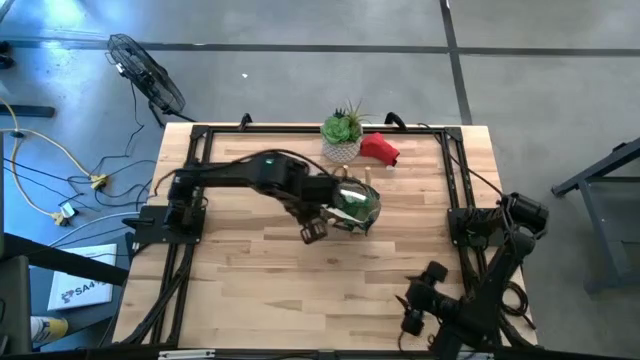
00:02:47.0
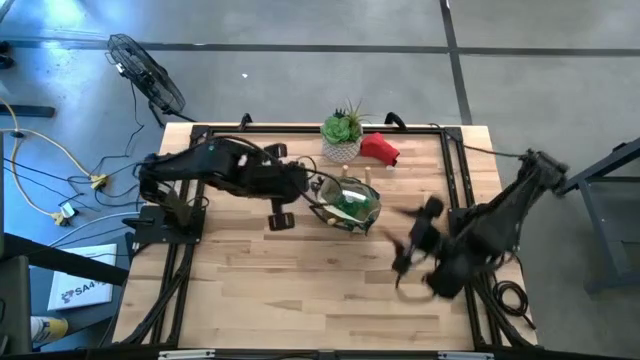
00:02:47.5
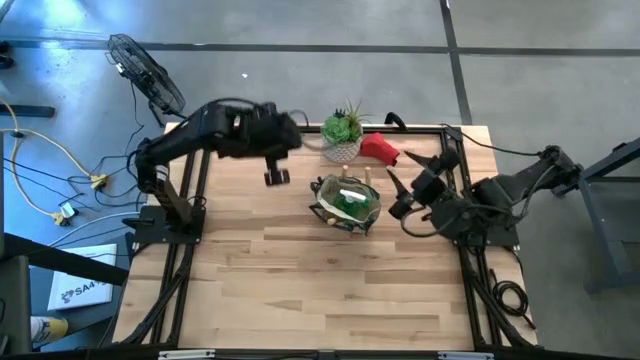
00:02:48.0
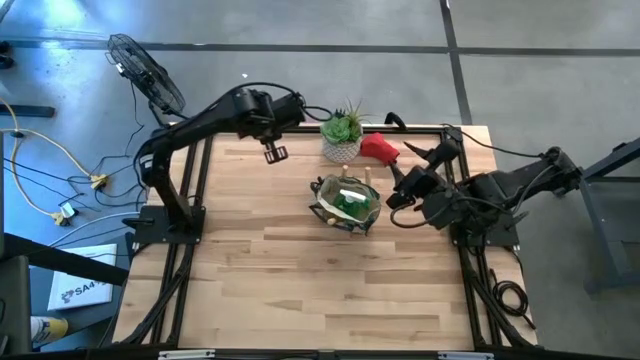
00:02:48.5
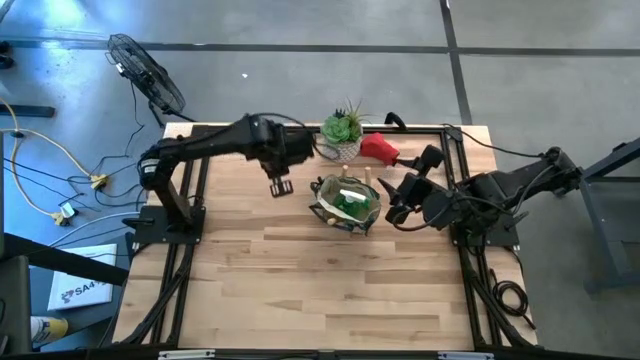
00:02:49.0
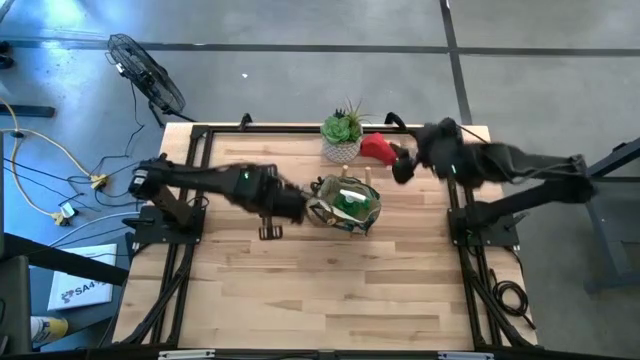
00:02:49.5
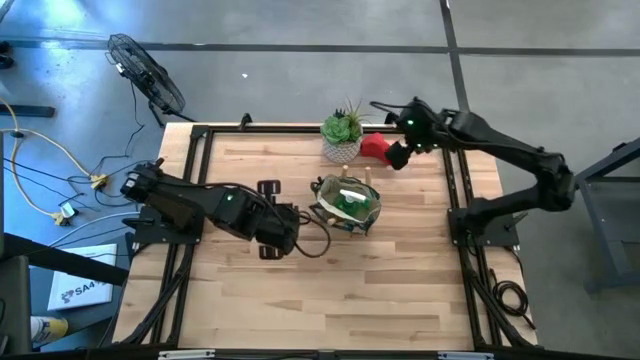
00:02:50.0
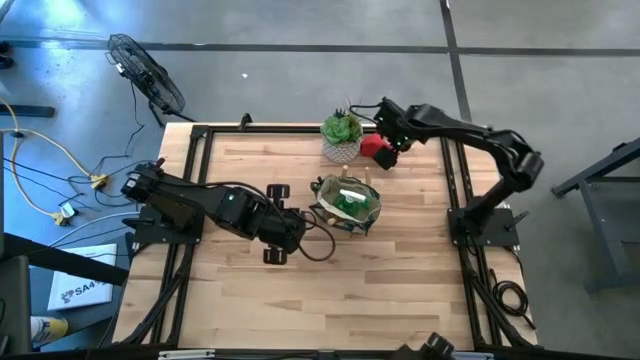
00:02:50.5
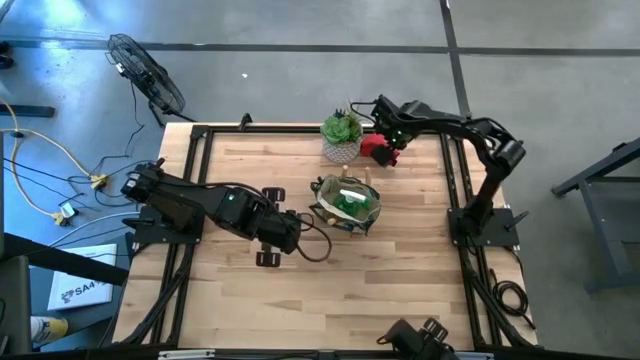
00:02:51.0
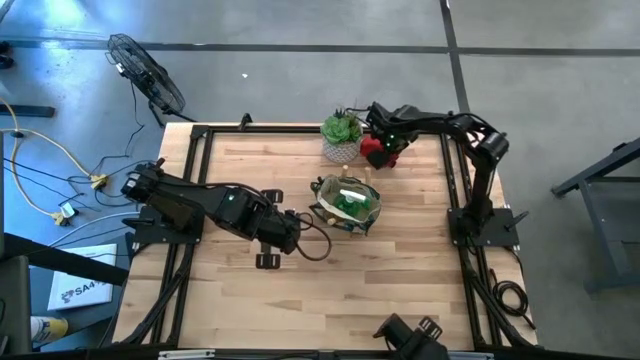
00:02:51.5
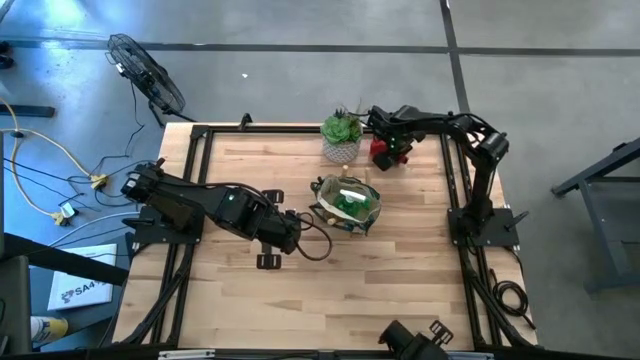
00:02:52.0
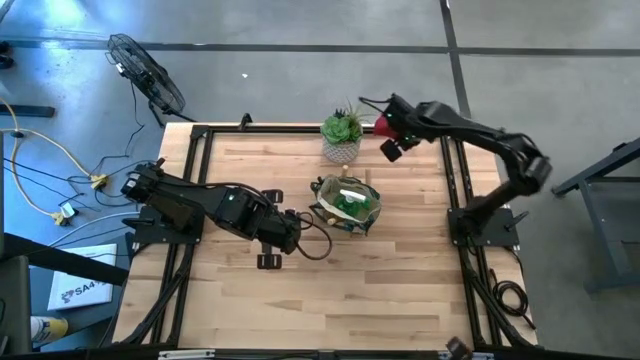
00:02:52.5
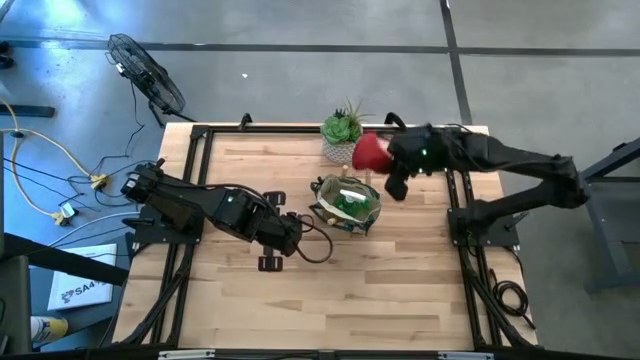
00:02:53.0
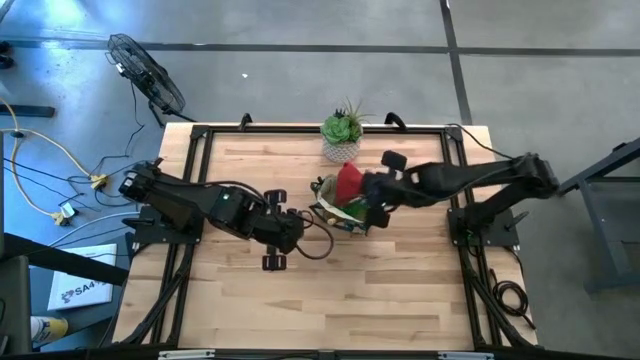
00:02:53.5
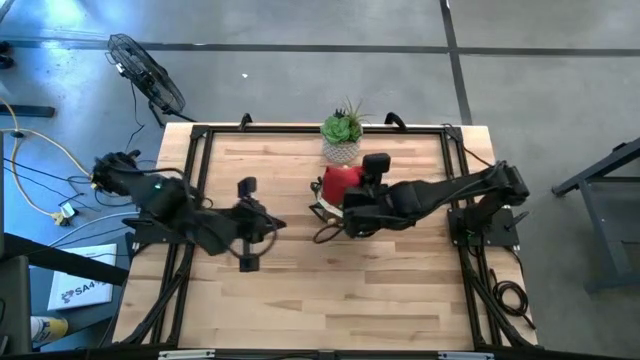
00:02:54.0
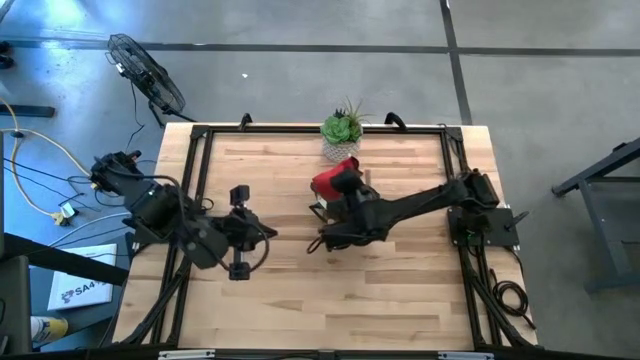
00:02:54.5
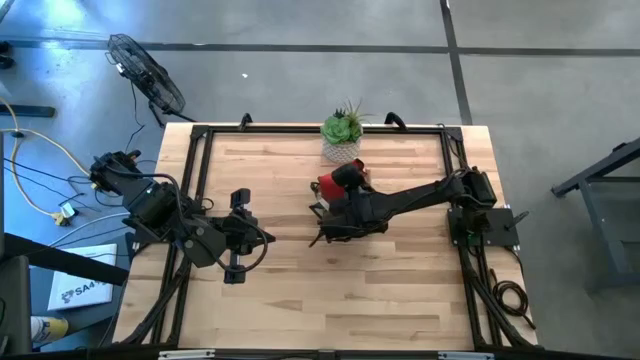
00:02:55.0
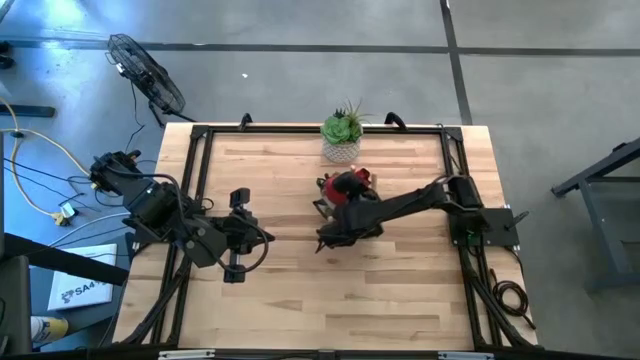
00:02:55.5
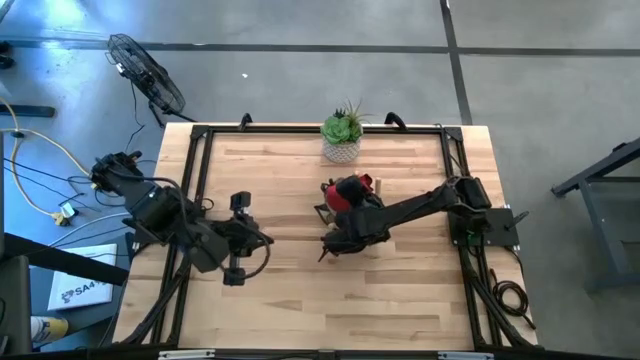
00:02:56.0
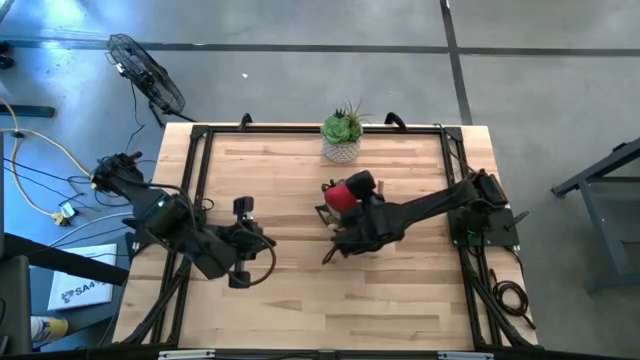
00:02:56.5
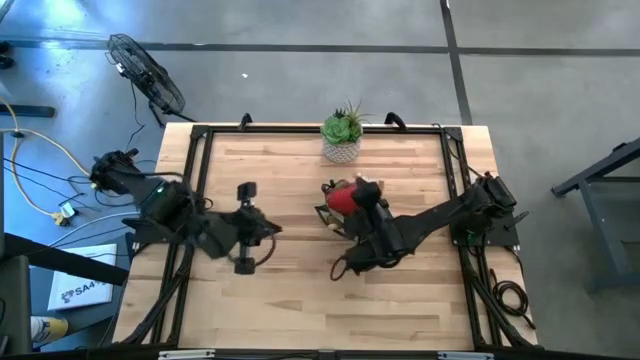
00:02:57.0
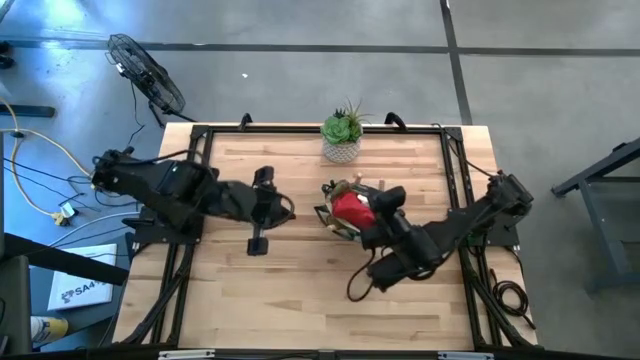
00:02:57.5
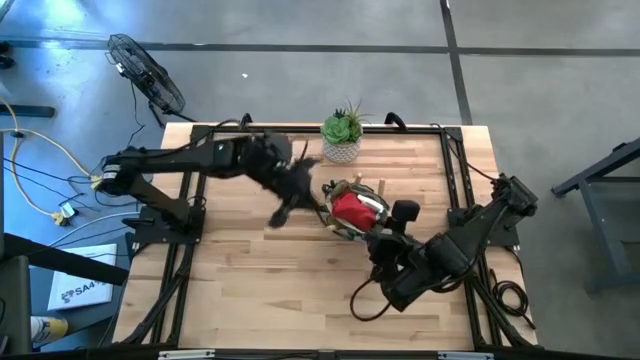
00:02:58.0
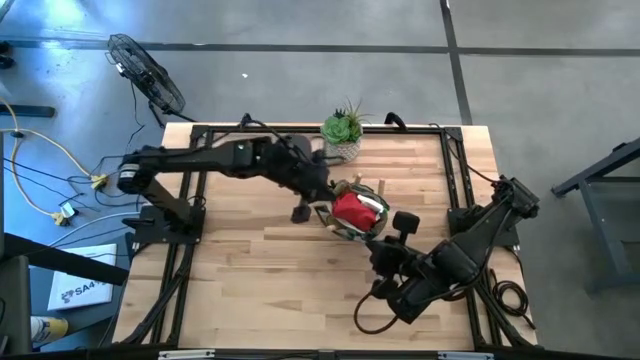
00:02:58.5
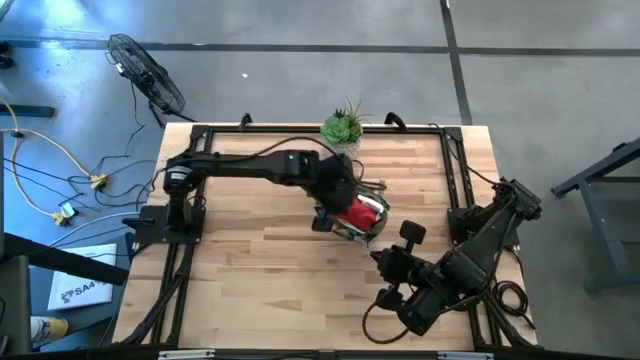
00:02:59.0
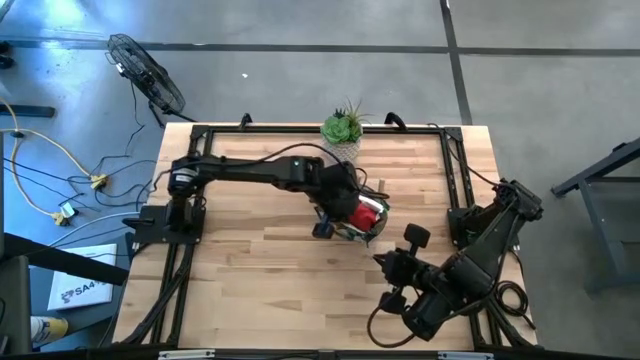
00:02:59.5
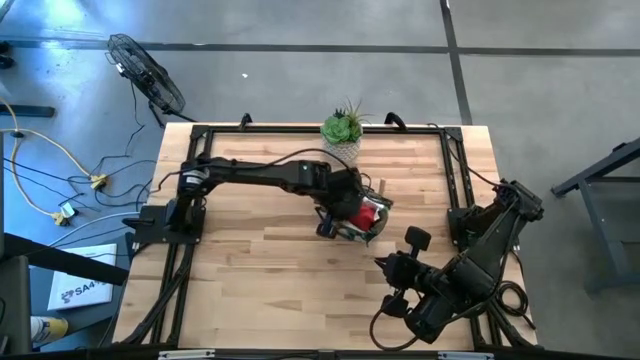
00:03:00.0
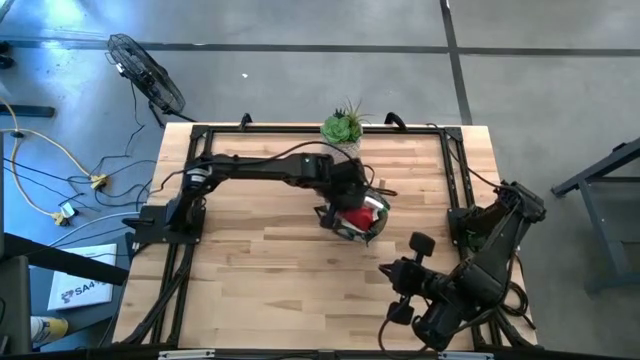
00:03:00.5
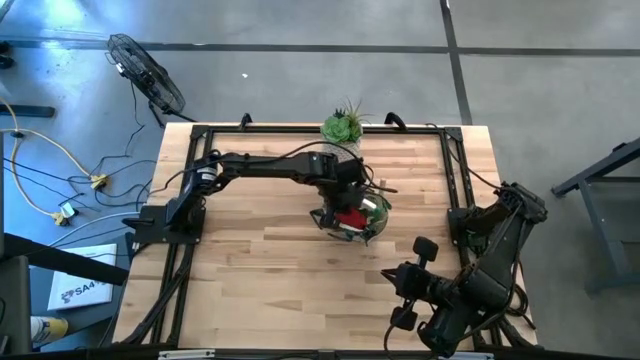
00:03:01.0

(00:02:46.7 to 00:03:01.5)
Task: Pick & Place Garden tools in Gardening bag
Put the red gloves into the gardening bag

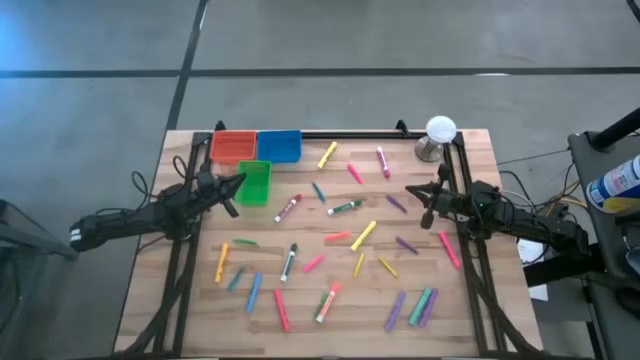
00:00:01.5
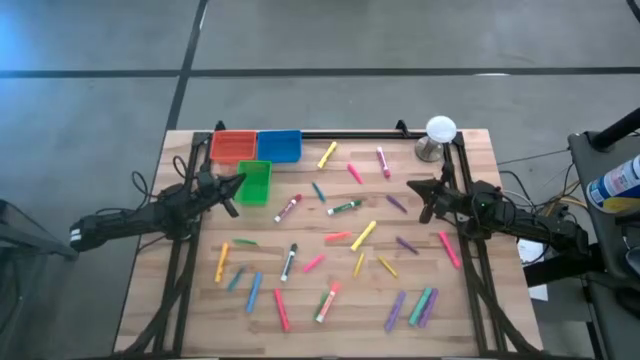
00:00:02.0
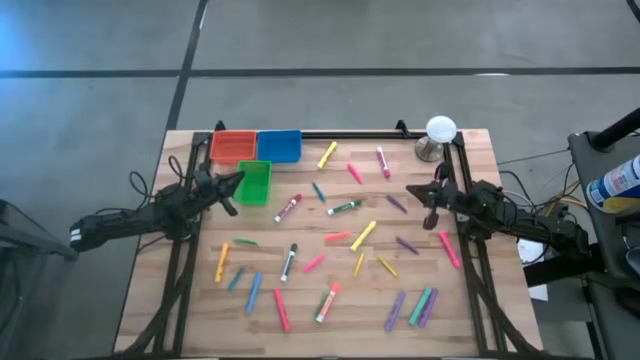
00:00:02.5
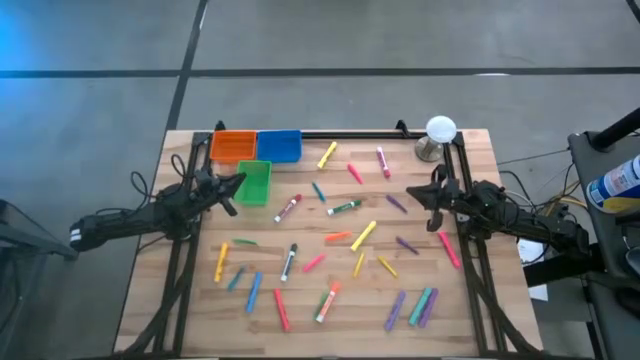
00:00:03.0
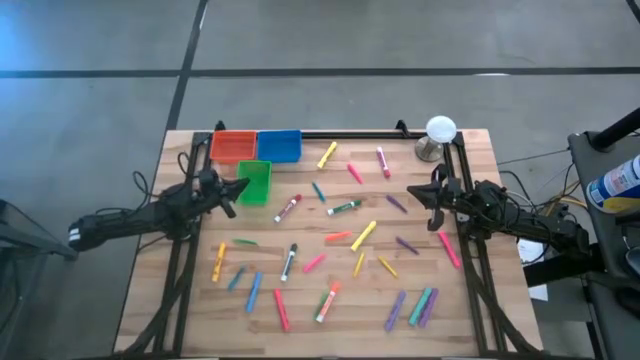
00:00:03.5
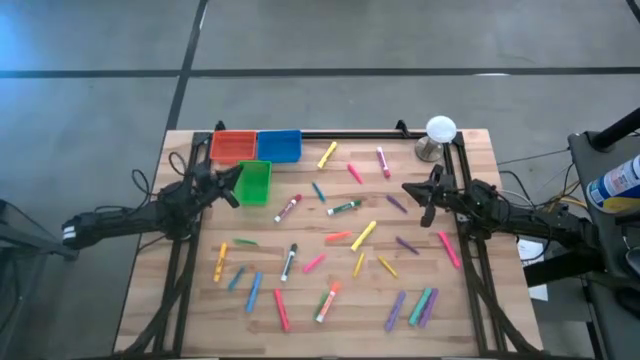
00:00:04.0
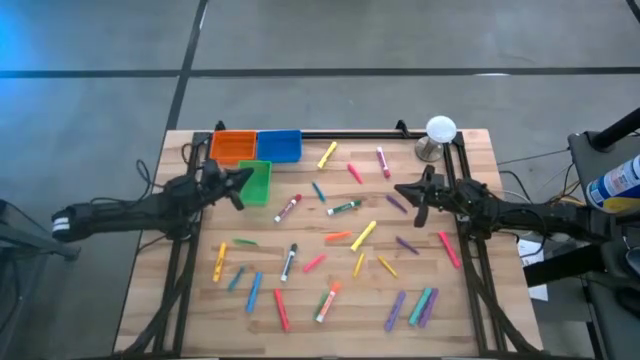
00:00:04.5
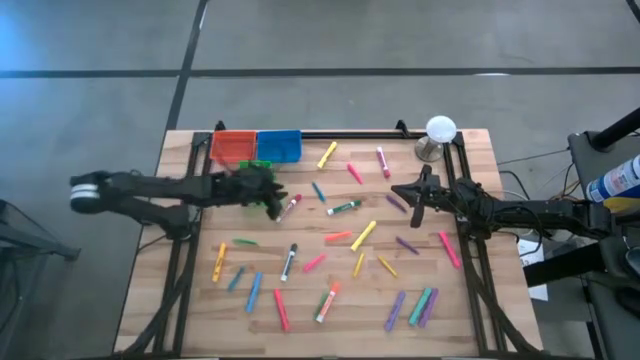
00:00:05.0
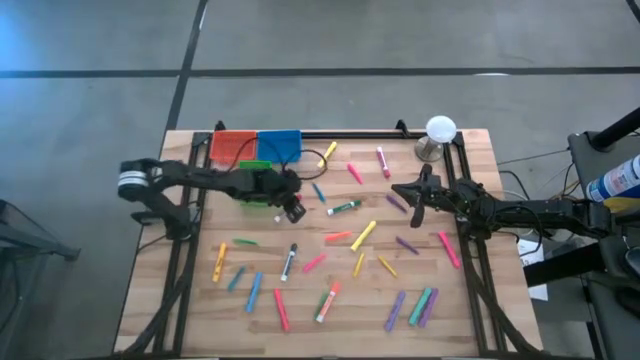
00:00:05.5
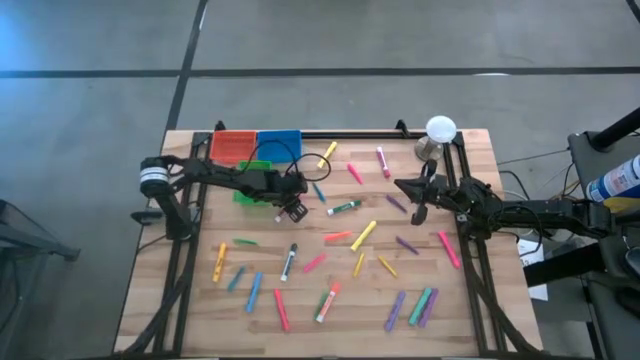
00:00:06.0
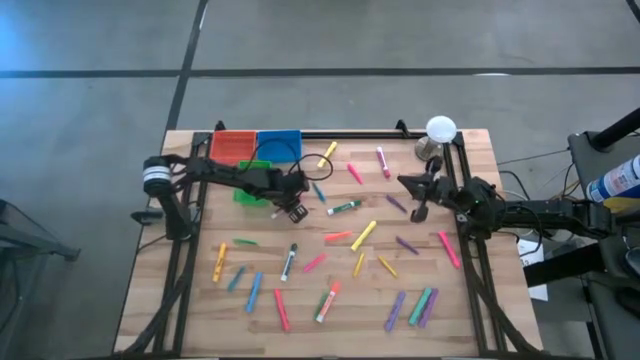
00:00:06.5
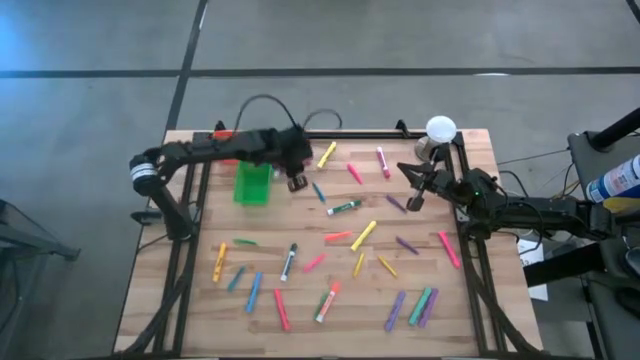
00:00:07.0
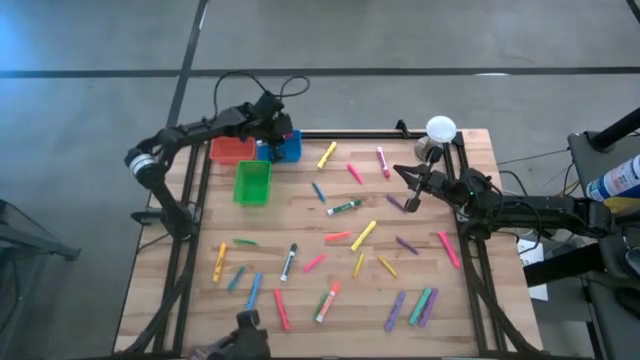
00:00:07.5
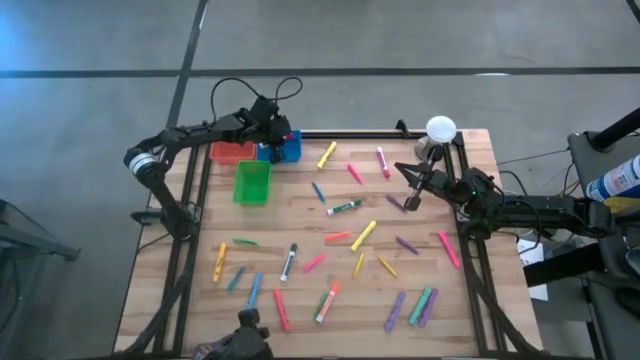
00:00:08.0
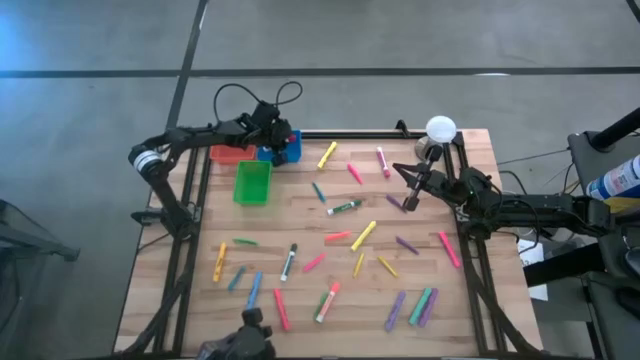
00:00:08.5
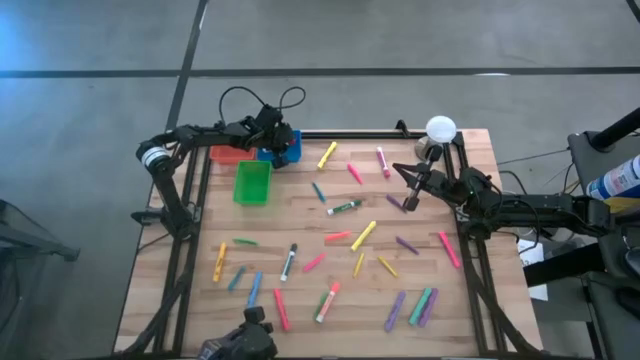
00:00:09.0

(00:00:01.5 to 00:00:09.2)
Task: Pick & Place Markers
Put the red marker into the blue bin
